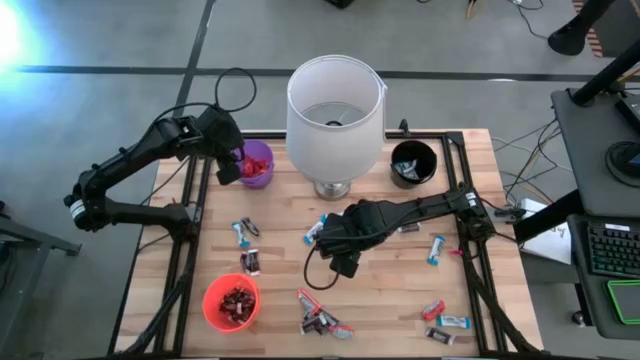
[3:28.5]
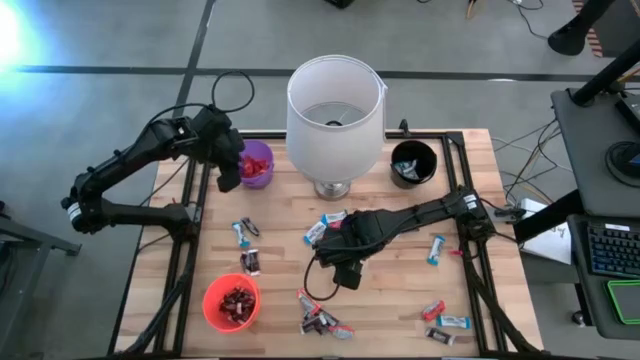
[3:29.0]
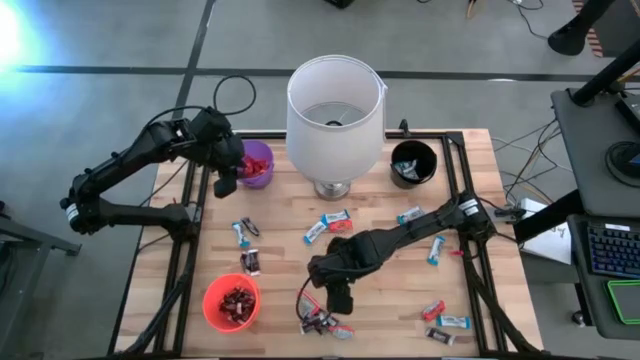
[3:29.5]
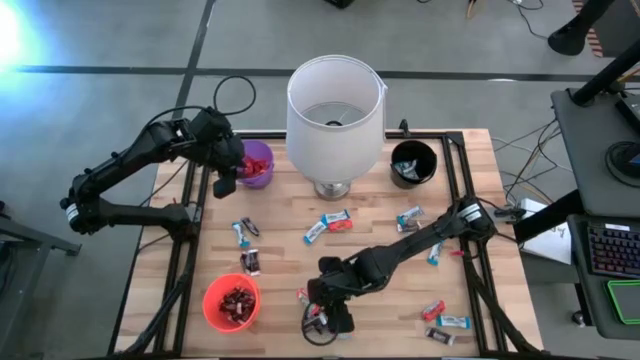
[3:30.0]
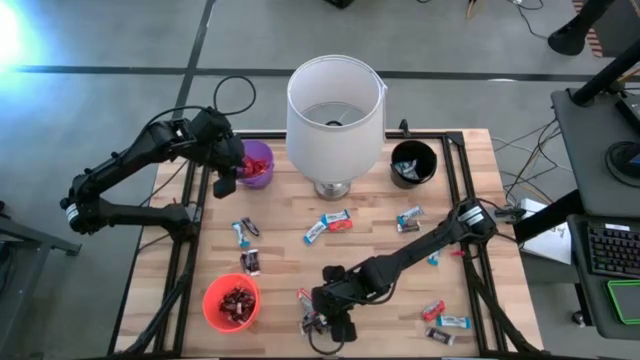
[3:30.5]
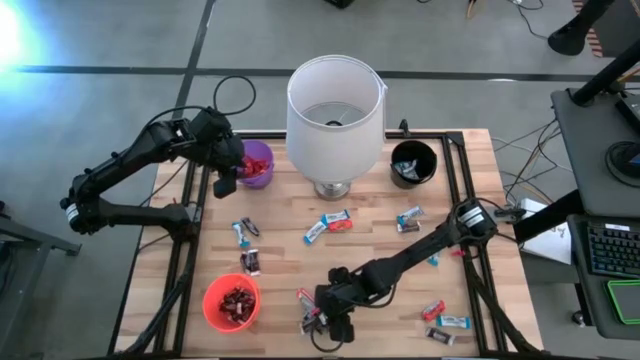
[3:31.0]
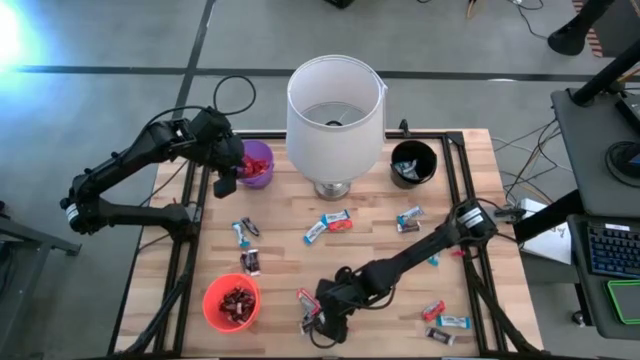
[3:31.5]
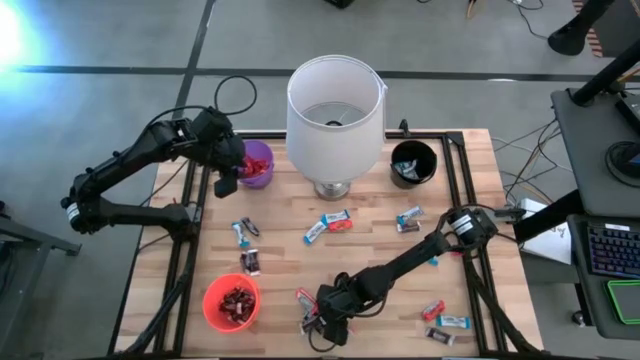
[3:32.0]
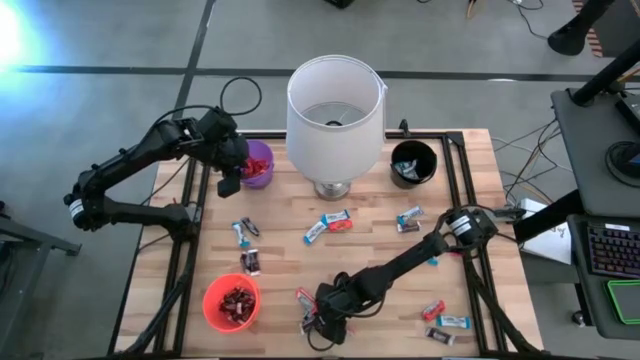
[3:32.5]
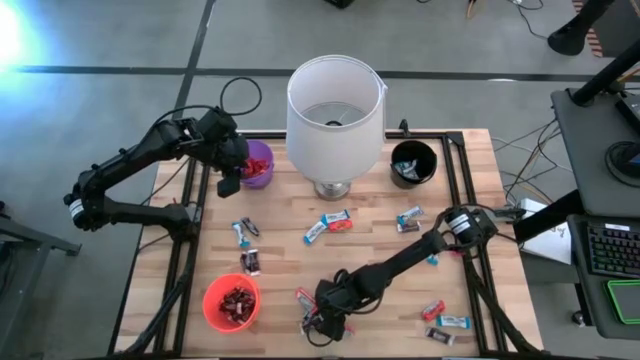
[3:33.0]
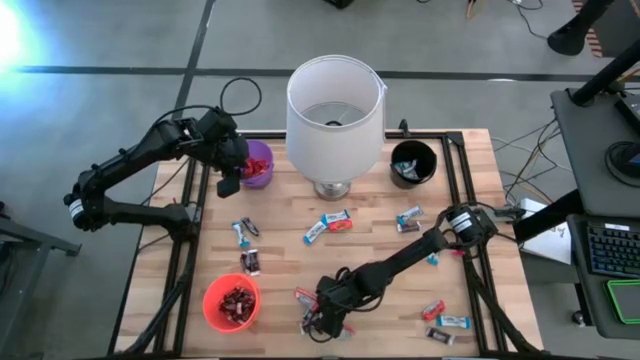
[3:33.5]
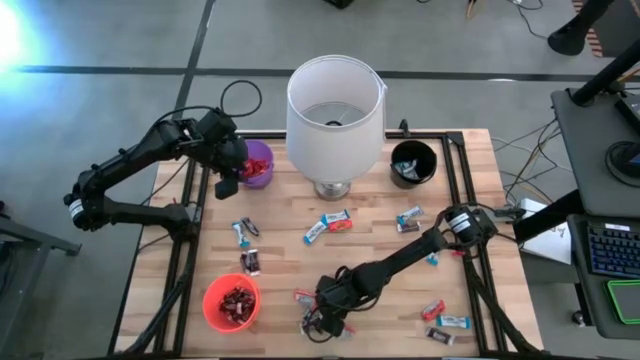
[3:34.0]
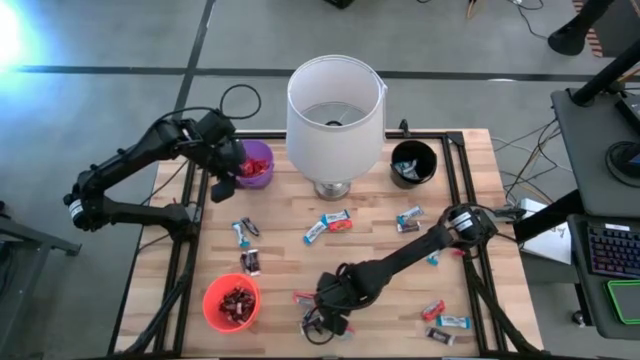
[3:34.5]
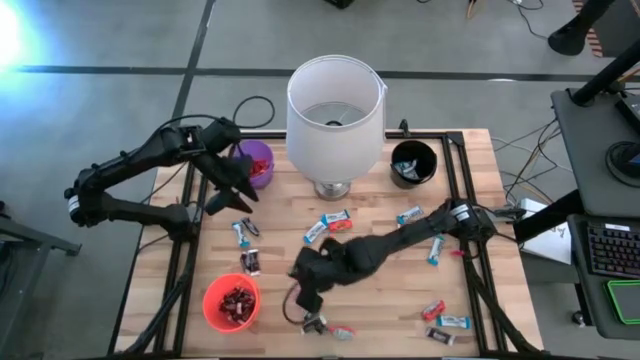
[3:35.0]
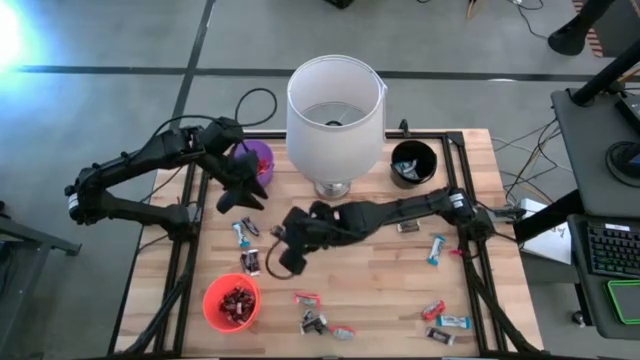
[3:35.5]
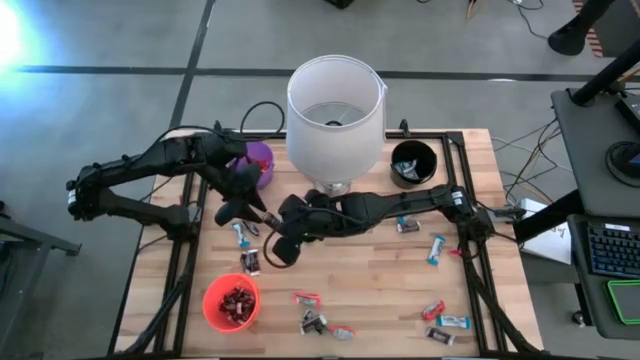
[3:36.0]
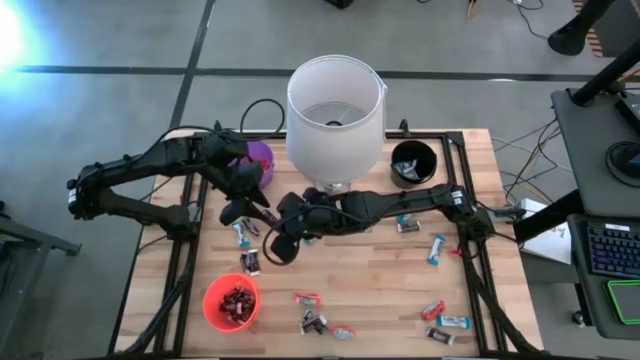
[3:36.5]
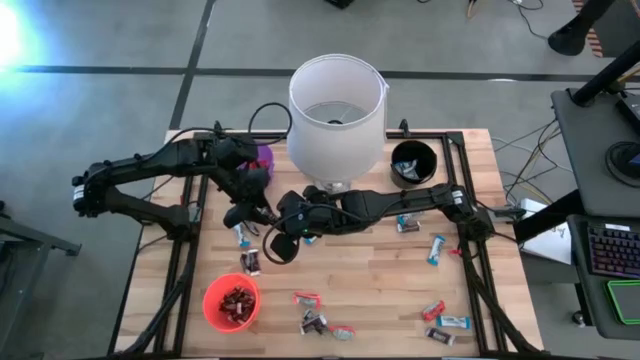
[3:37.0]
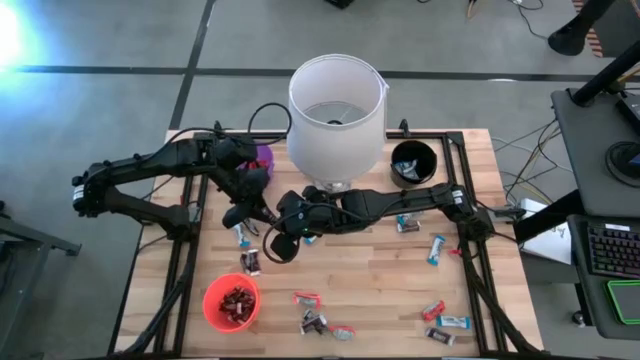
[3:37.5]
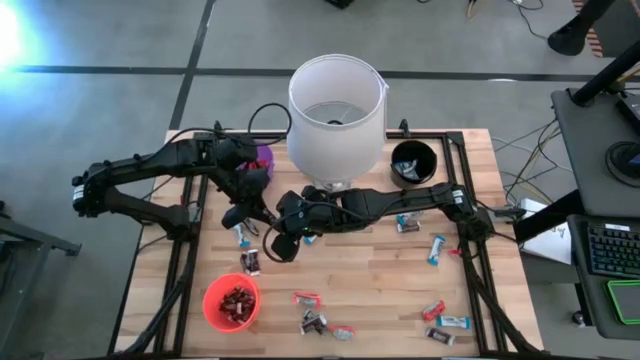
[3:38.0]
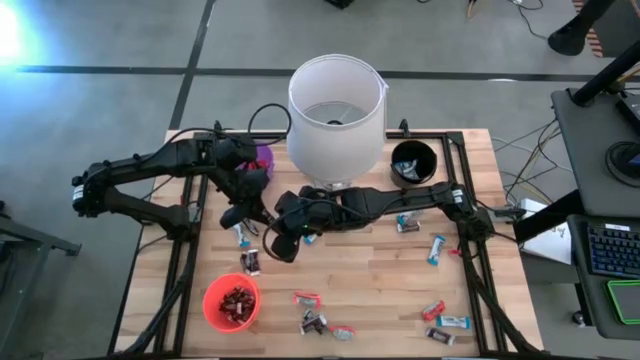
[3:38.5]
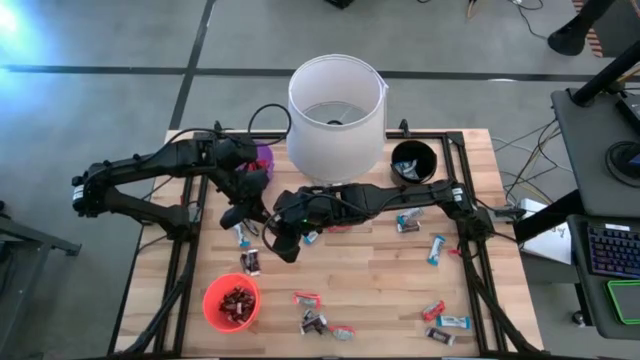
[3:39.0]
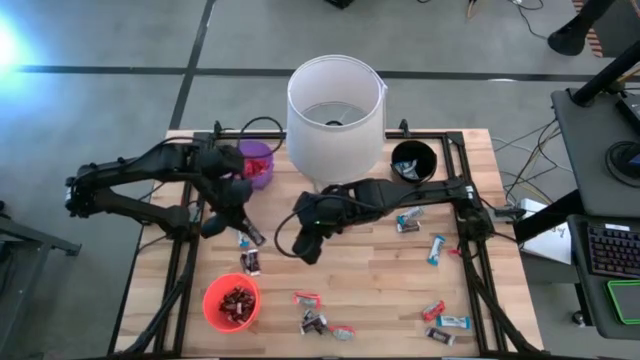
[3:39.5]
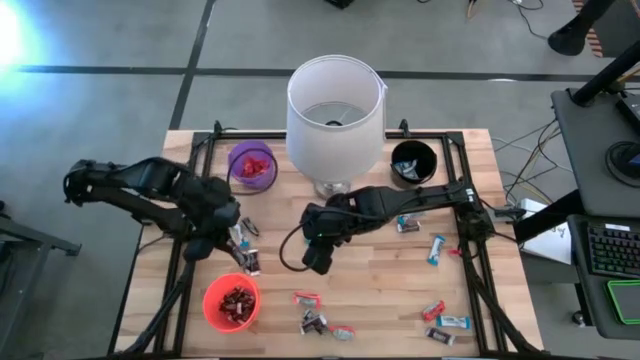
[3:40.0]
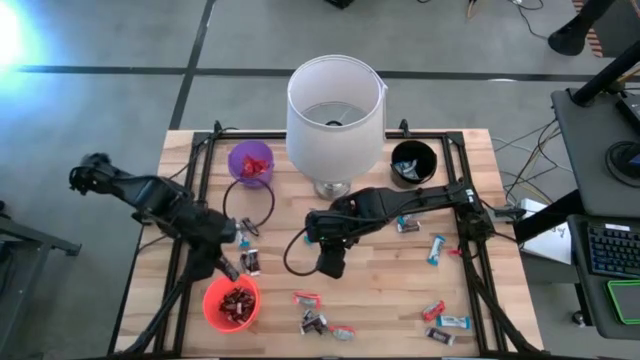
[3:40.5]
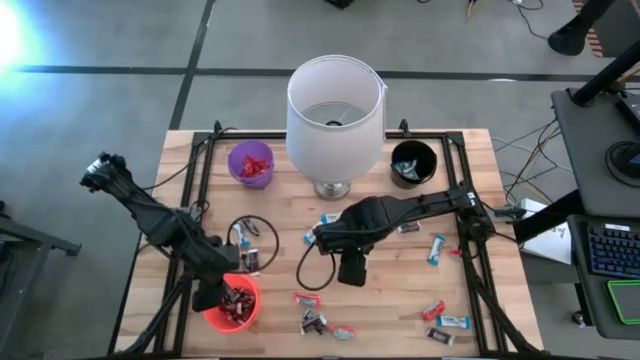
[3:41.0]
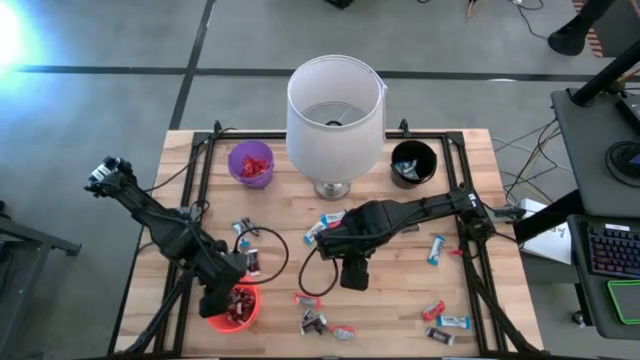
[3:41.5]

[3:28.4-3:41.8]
Task: Sort candy
Put the black chocolate into the orange bucket

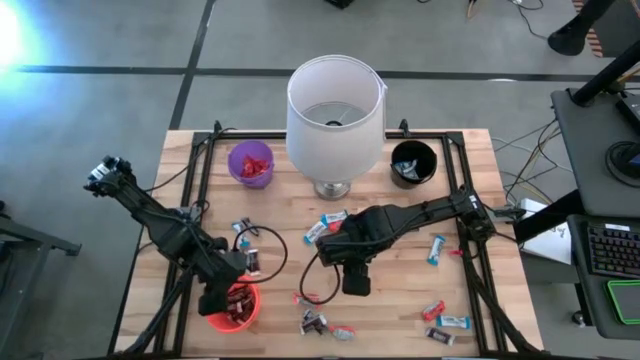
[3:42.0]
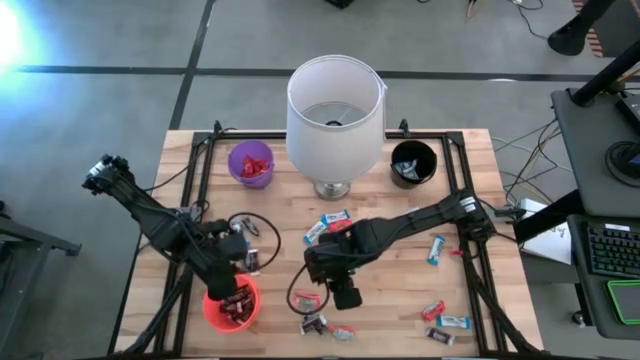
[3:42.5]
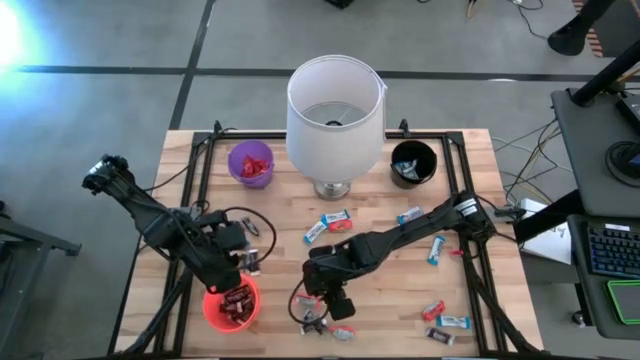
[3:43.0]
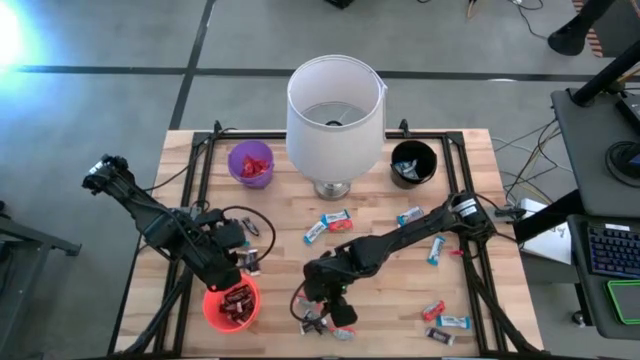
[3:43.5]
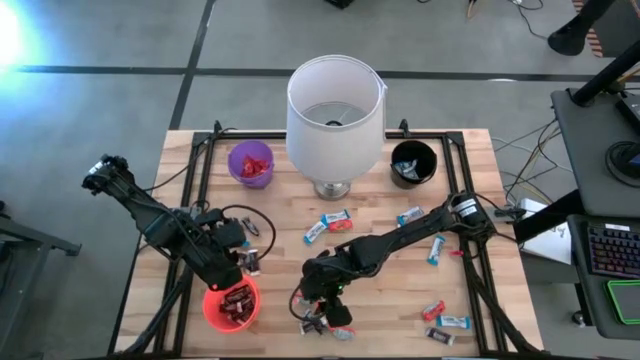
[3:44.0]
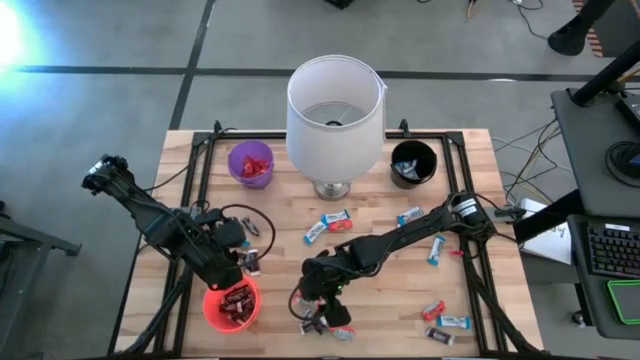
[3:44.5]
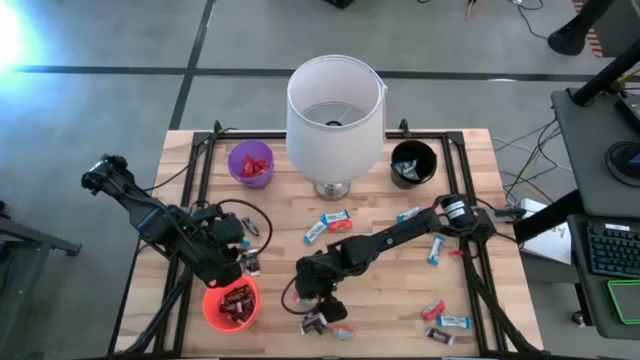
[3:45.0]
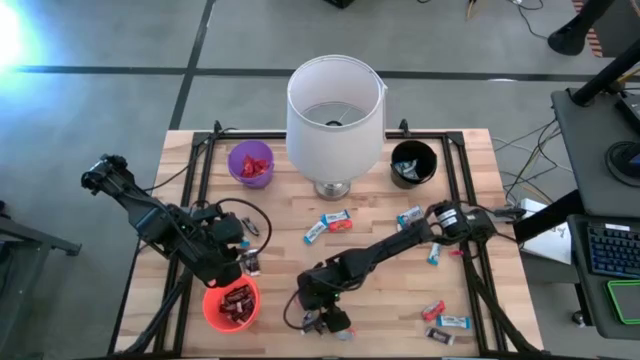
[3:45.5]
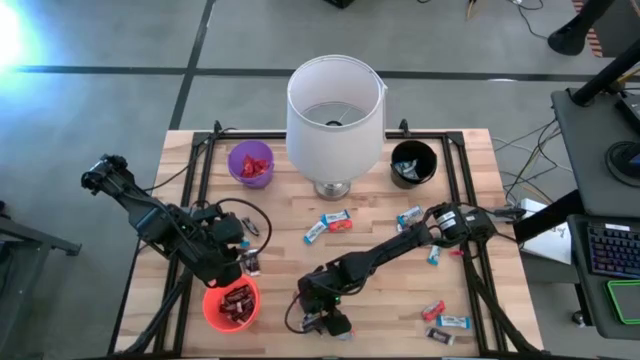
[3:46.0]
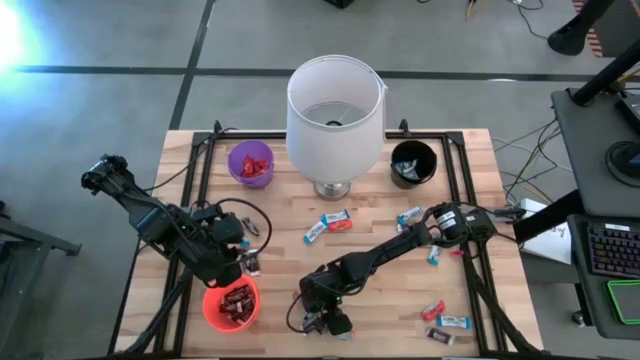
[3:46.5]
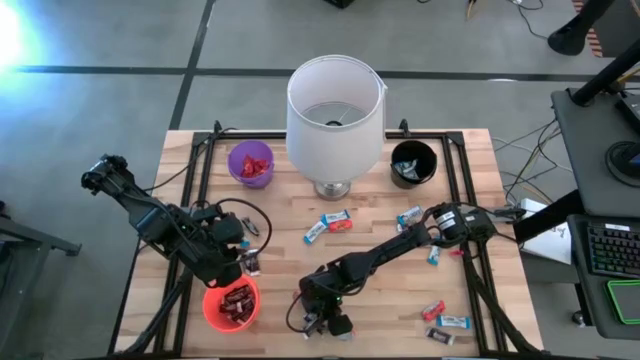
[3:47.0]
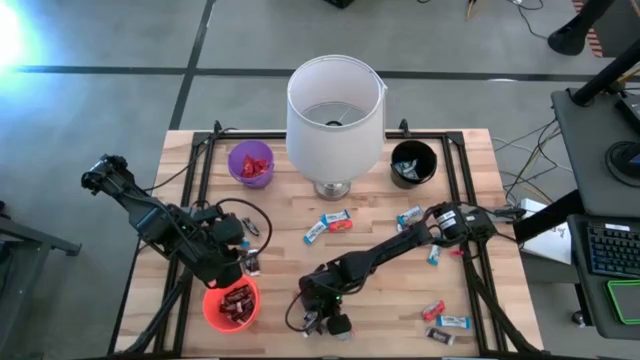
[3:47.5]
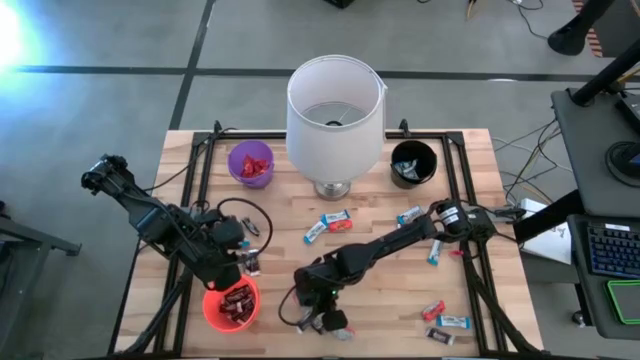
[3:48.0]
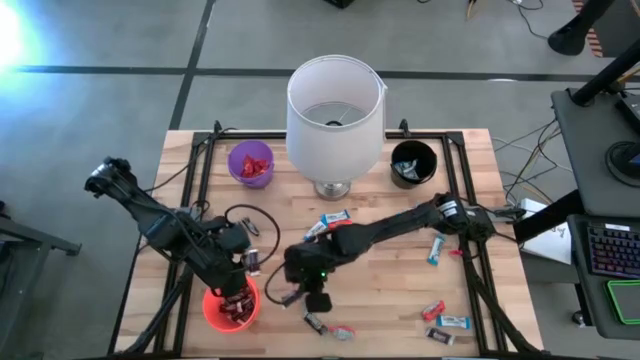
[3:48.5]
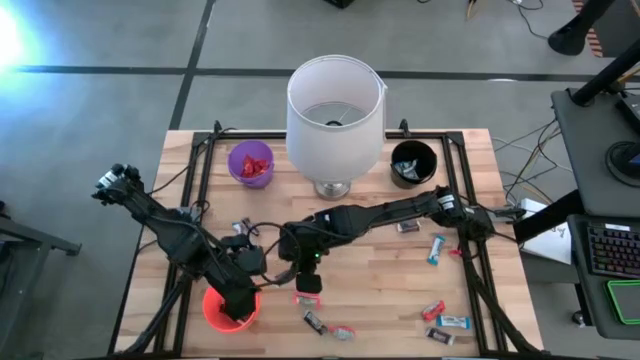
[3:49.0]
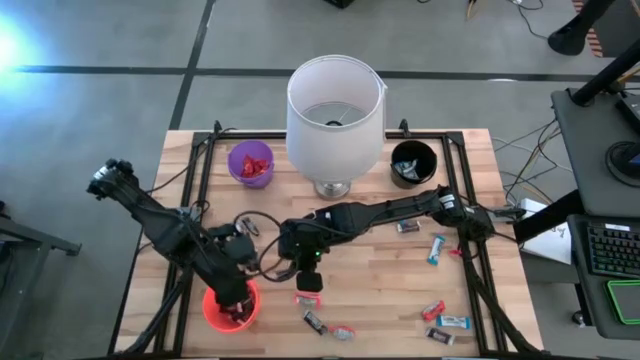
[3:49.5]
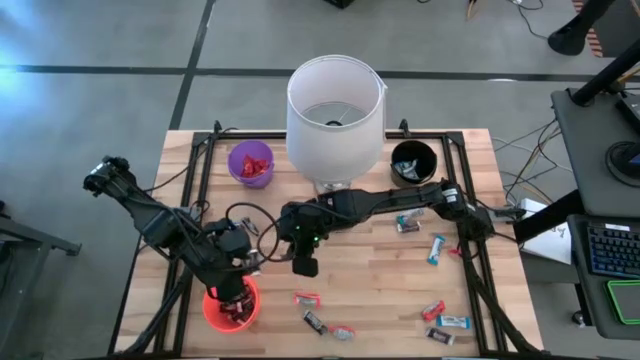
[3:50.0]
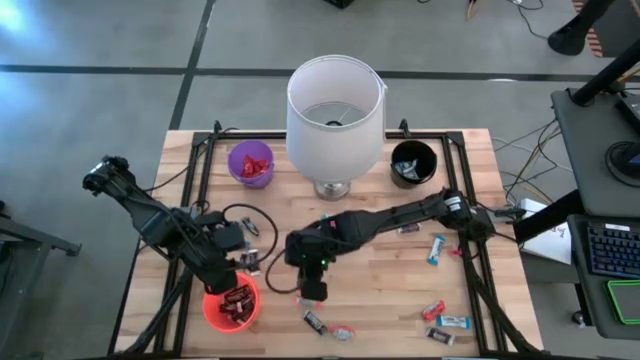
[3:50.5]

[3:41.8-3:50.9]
Put the black chocolate into the orange bucket
